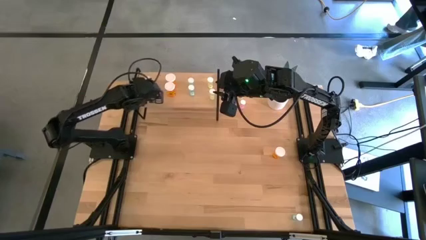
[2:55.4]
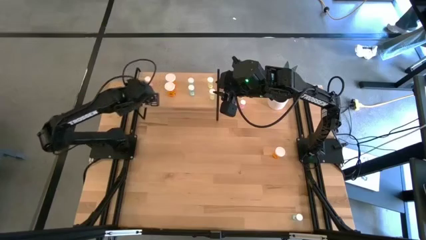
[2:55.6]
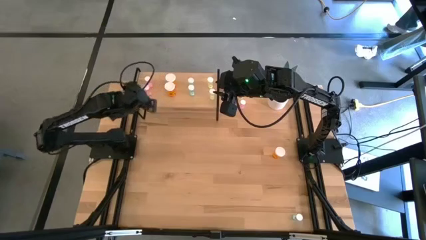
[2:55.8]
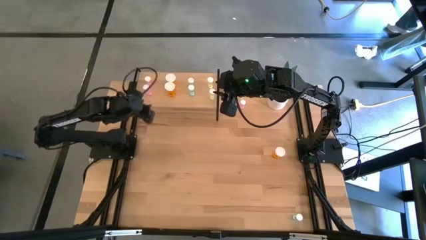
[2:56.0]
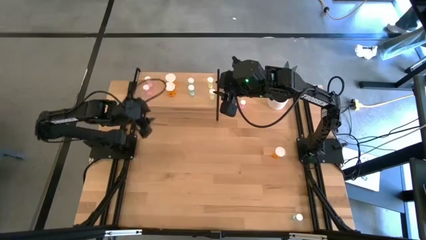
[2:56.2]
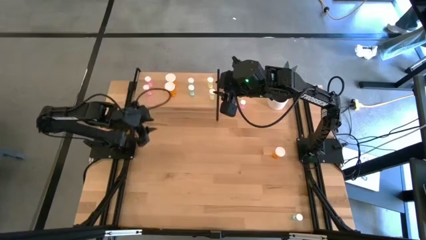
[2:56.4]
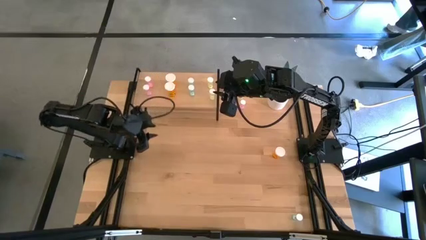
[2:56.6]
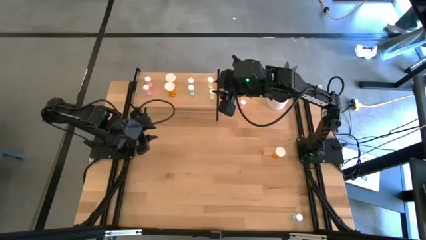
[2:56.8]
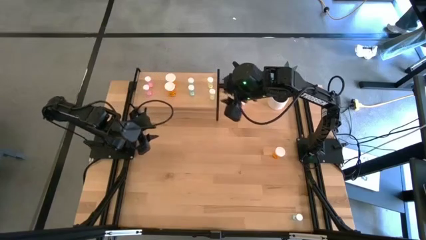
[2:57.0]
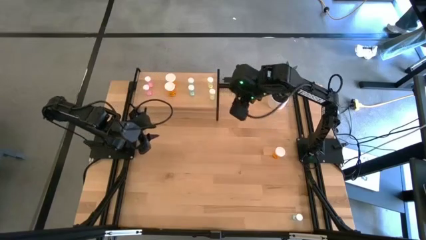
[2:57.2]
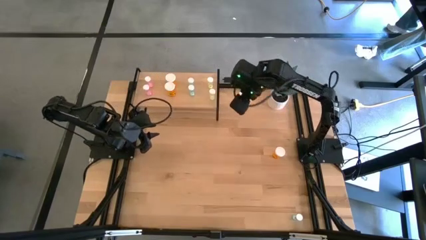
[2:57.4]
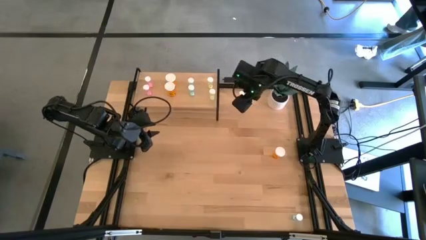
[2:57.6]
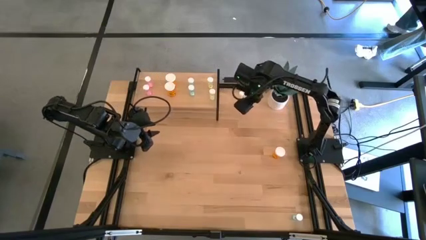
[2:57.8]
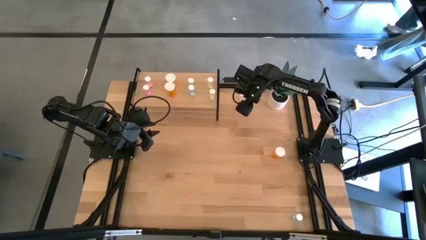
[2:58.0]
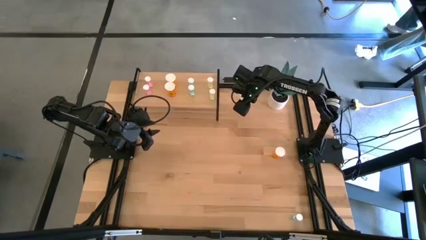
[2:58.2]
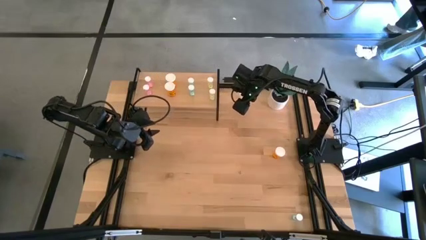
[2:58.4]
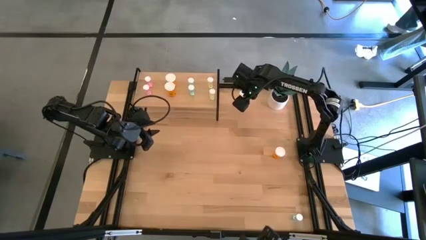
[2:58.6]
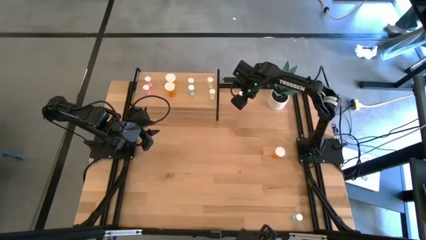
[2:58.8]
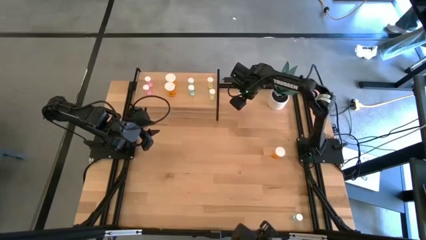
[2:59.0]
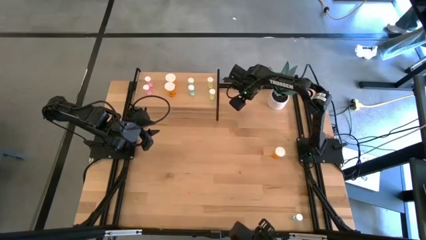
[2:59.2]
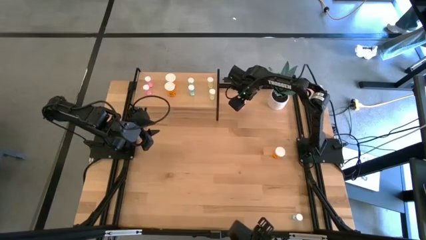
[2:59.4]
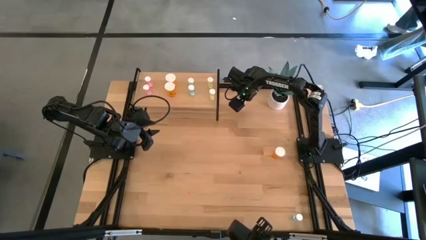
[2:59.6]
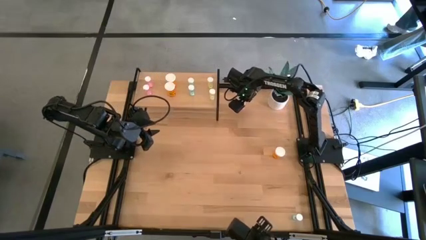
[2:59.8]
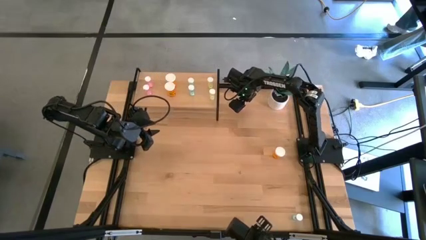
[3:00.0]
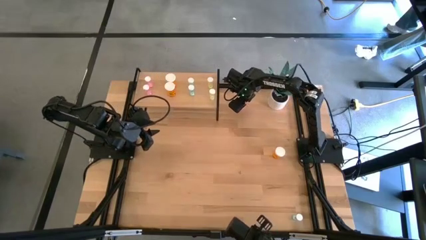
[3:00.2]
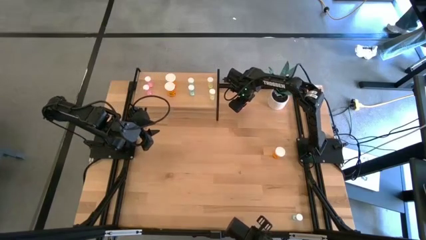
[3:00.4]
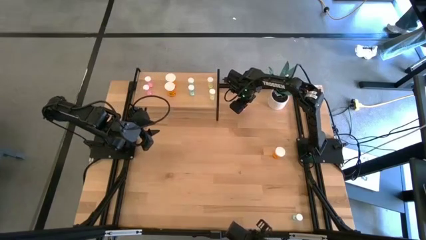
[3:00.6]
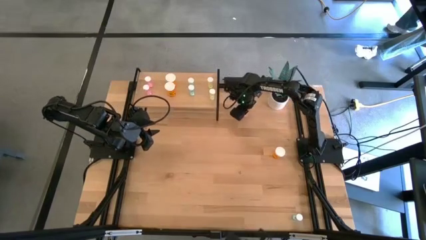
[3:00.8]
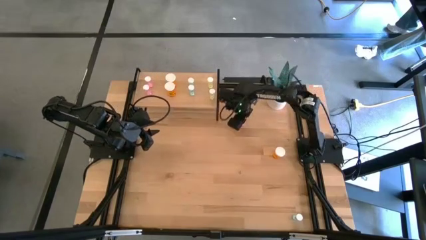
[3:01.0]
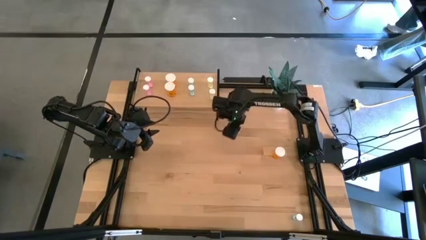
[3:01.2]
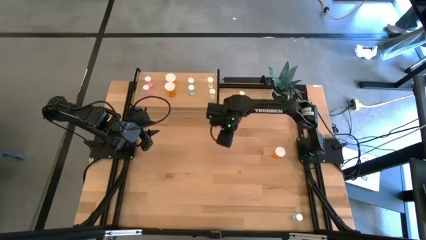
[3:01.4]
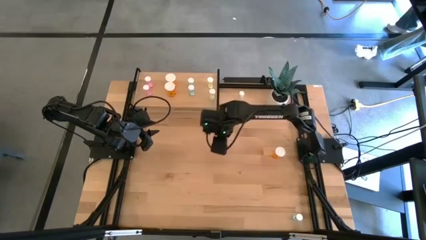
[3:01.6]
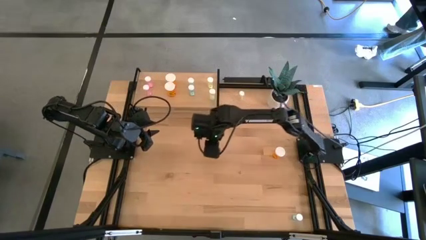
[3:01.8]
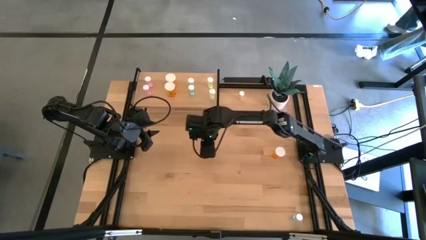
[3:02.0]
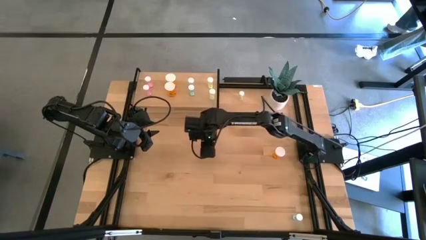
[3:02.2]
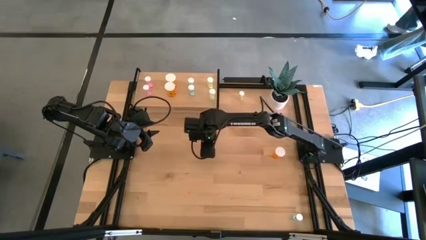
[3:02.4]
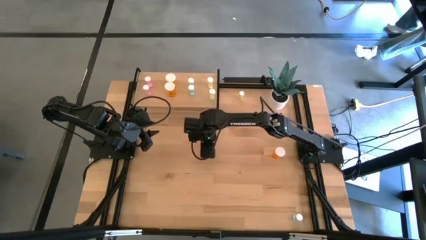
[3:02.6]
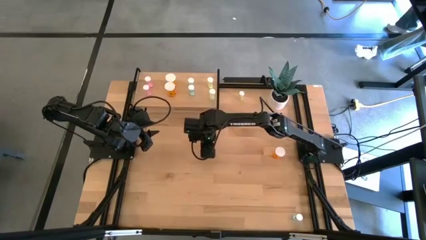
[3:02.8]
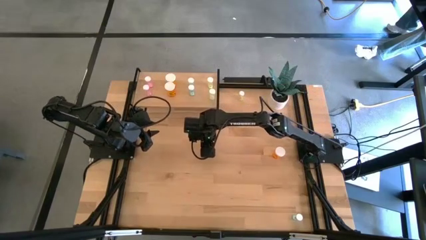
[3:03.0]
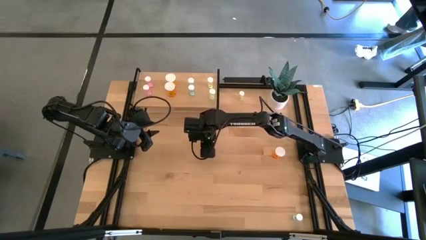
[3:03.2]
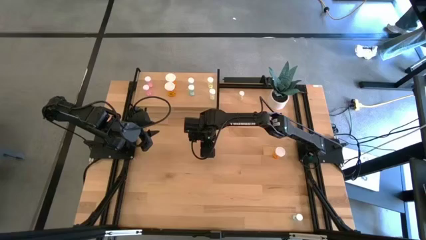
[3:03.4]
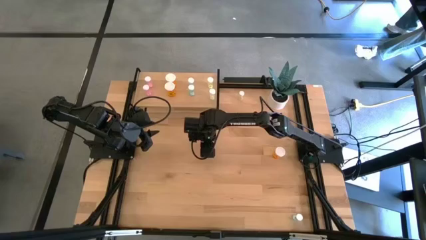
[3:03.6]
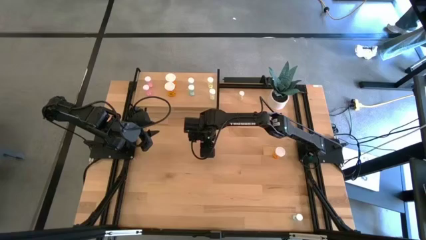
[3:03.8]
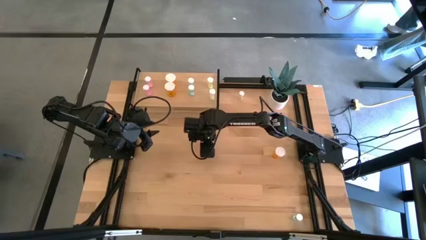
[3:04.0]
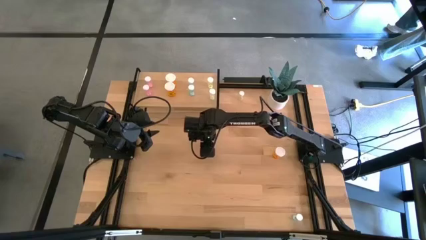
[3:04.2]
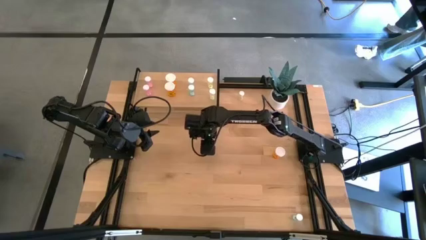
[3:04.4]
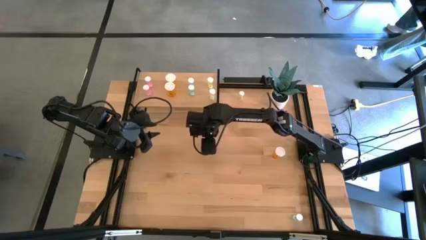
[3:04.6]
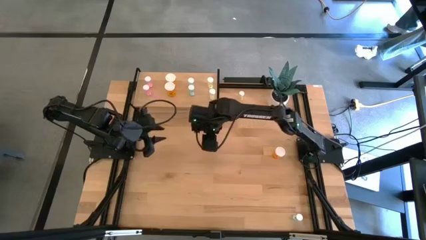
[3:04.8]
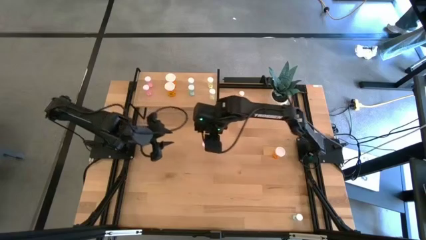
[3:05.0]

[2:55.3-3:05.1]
Task: Pick and place medicine bottles onto shelf by color
Put the pink pill bottle on the shelf aligned with the other pink pill bottles

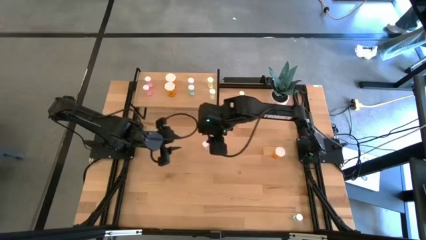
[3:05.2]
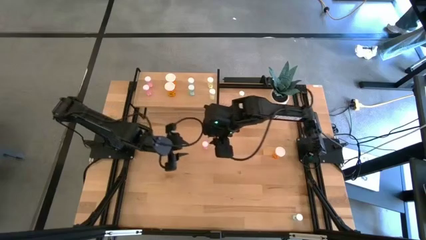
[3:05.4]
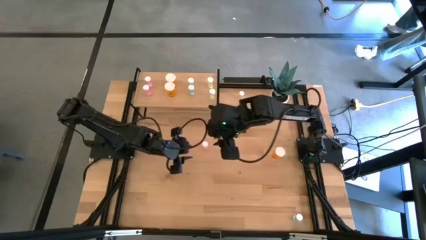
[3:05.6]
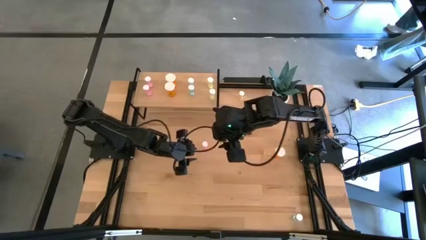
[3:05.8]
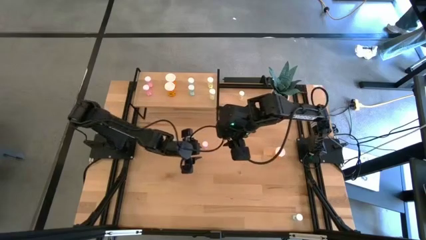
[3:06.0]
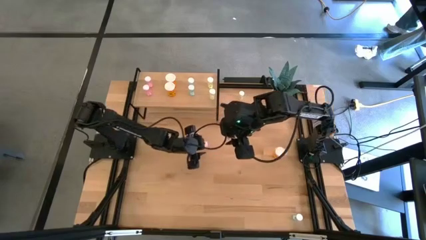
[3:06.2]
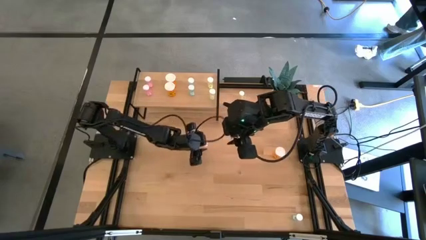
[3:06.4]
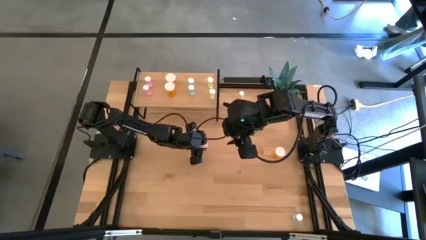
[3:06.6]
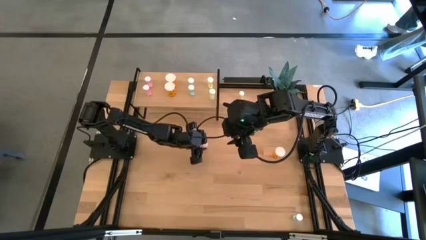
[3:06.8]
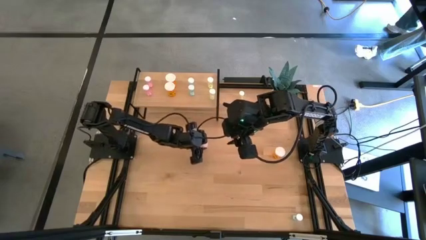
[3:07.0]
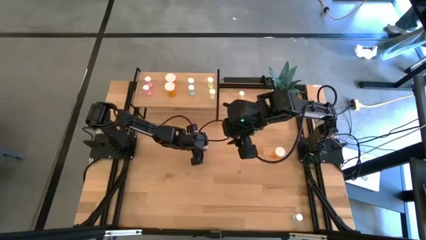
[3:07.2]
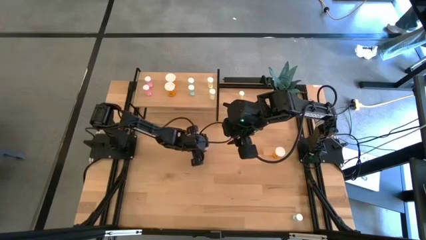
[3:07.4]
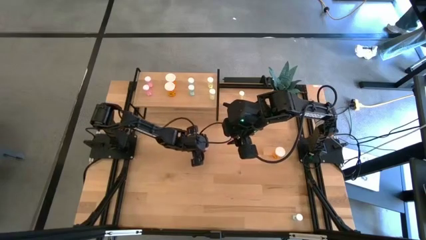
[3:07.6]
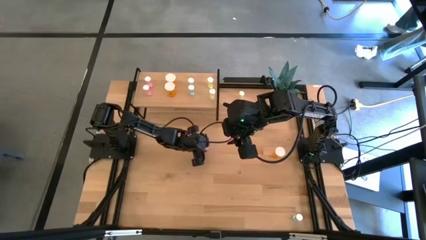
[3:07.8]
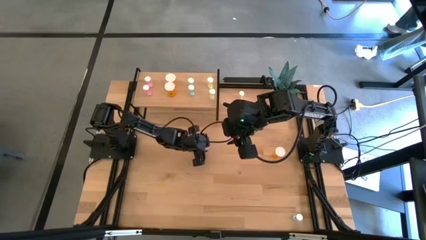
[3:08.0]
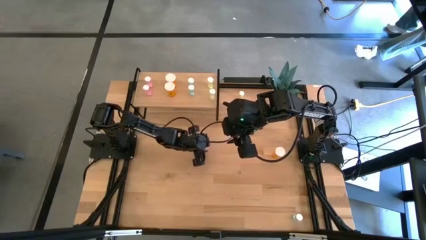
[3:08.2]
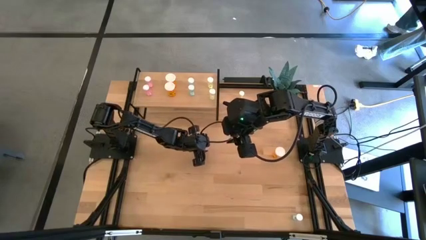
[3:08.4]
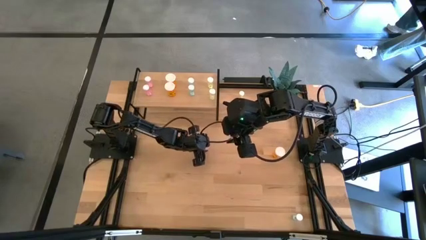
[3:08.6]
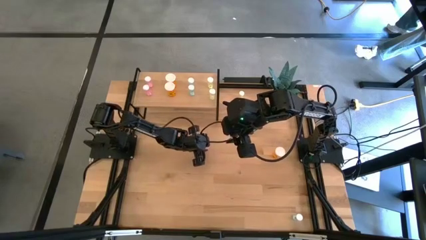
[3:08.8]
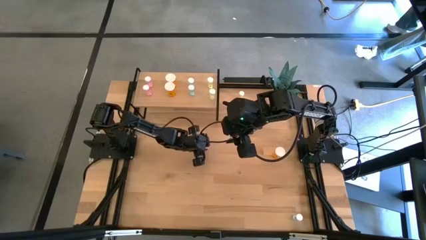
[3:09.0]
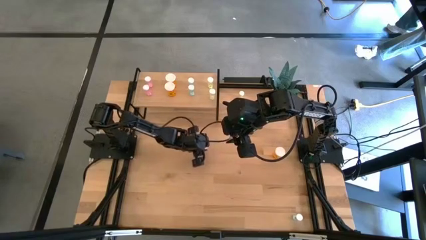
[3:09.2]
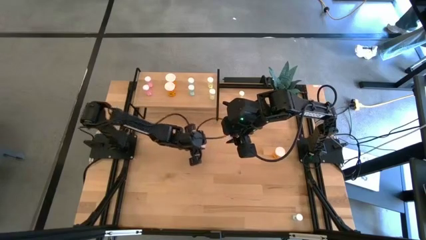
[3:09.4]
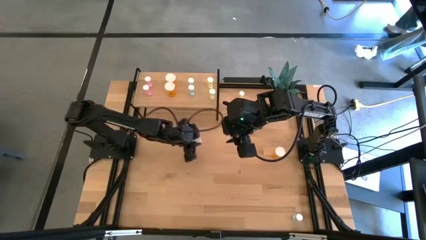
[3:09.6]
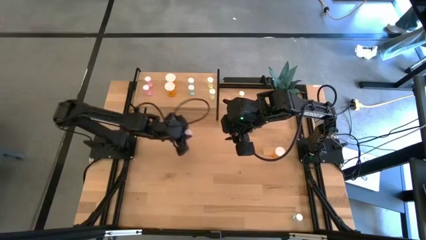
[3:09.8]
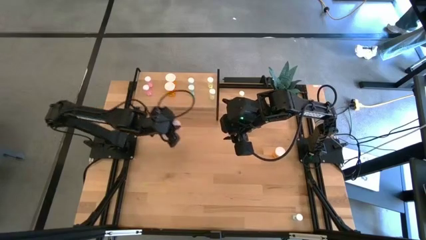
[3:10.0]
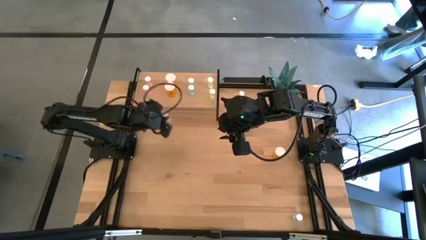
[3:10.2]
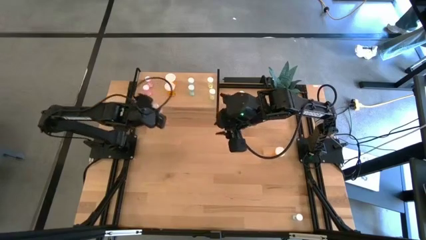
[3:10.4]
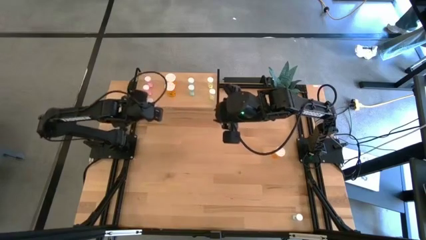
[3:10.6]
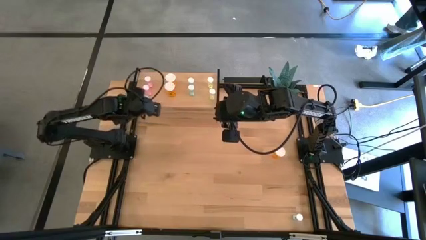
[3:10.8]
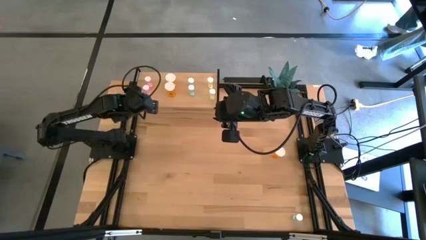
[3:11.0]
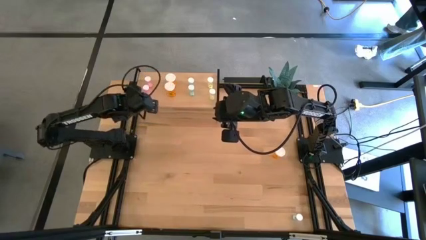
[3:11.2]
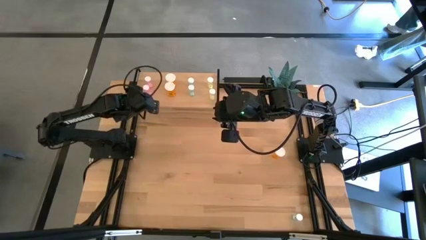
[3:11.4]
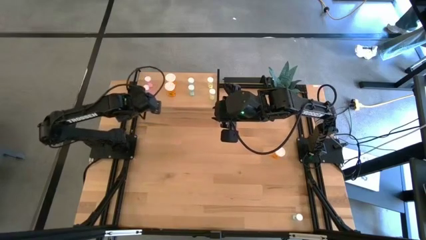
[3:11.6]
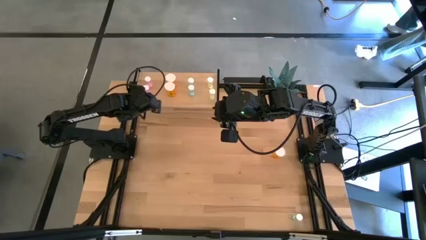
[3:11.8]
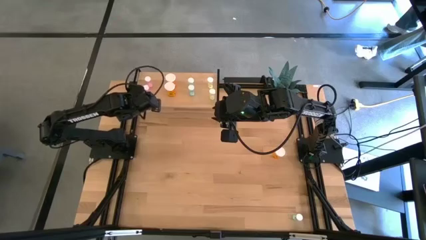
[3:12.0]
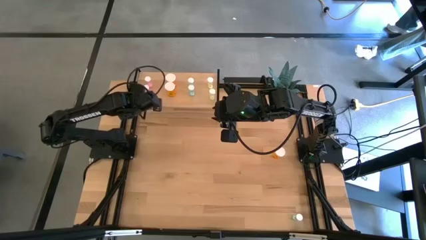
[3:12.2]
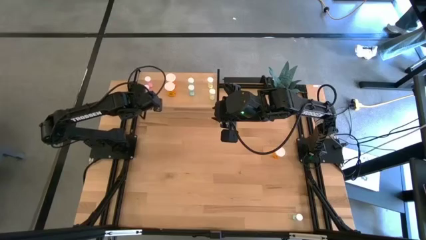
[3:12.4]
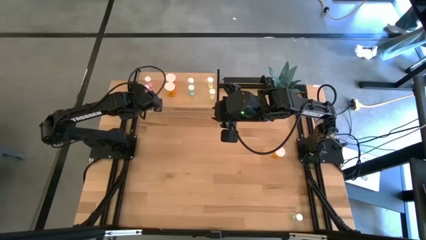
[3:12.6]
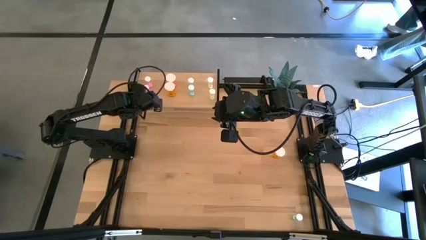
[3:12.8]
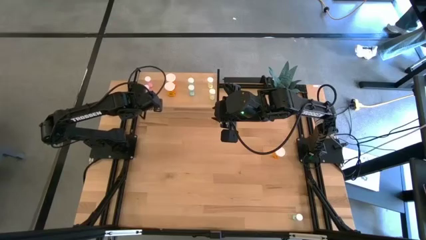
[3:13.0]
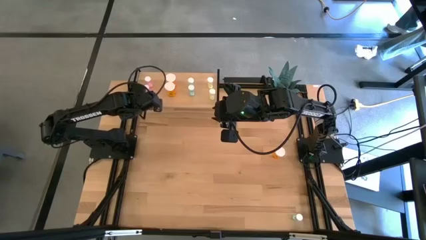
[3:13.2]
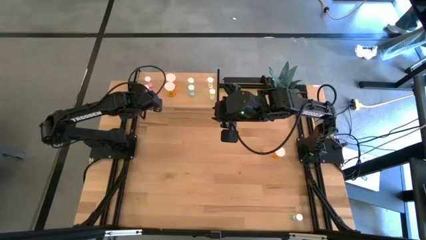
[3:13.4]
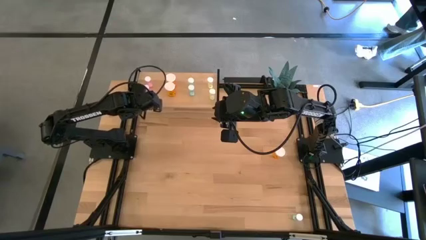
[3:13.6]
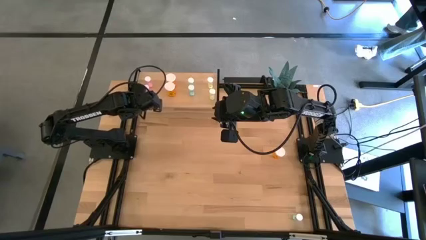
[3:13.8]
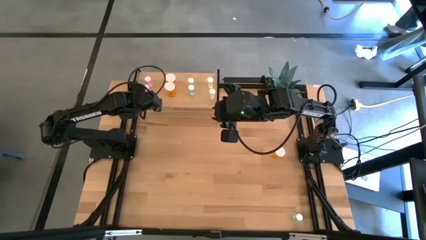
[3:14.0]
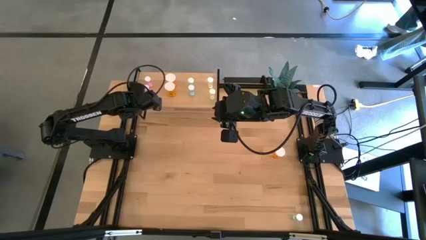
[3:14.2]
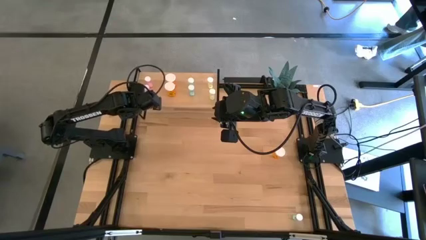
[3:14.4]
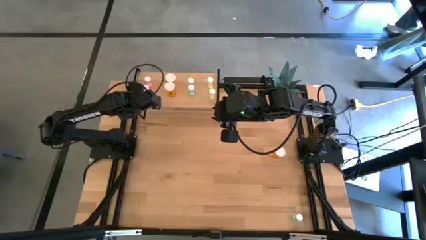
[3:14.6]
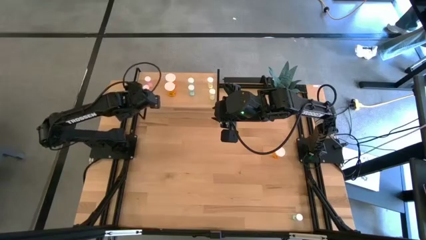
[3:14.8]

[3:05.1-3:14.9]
Put the pink pill bottle on the shelf aligned with the other pink pill bottles
